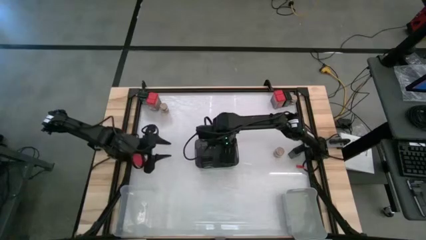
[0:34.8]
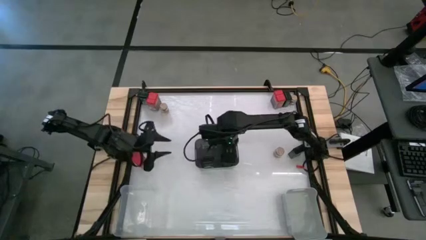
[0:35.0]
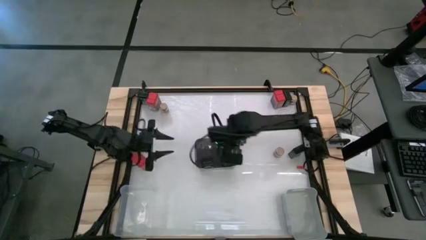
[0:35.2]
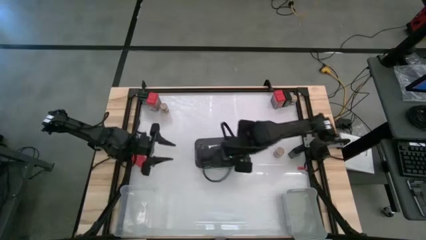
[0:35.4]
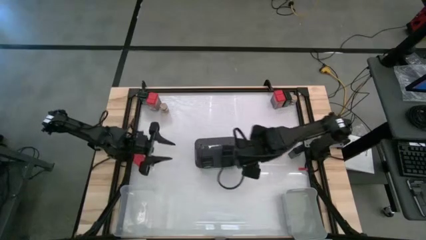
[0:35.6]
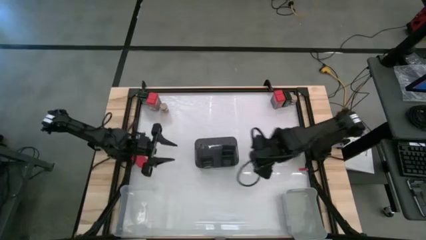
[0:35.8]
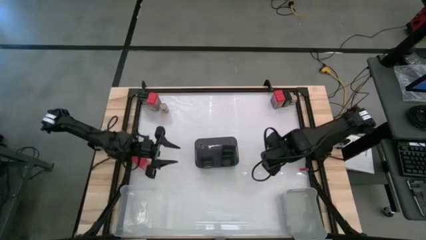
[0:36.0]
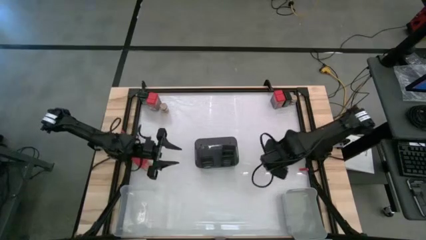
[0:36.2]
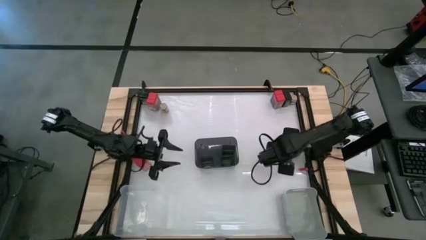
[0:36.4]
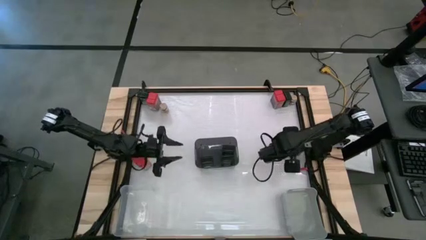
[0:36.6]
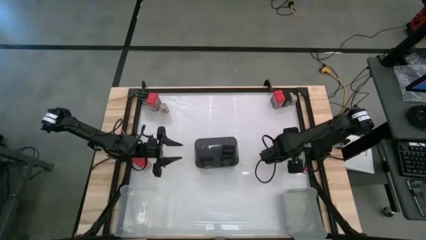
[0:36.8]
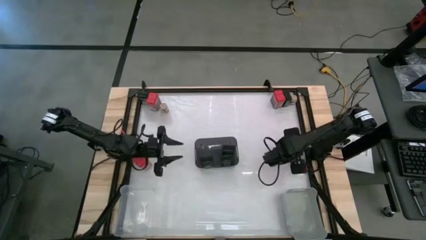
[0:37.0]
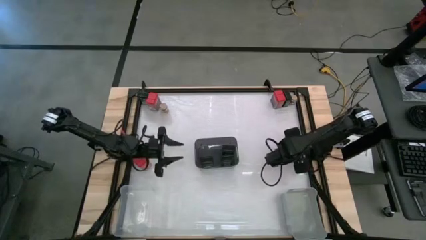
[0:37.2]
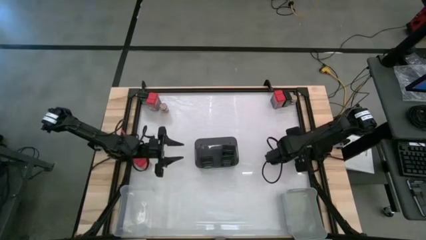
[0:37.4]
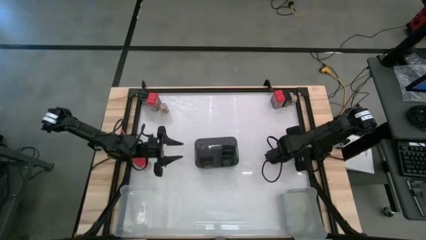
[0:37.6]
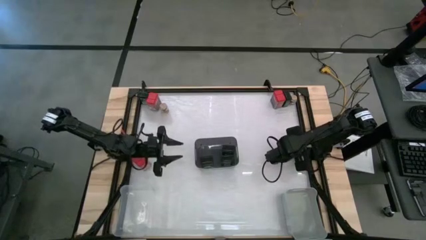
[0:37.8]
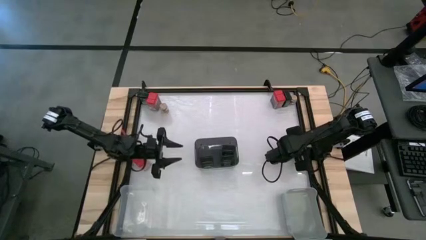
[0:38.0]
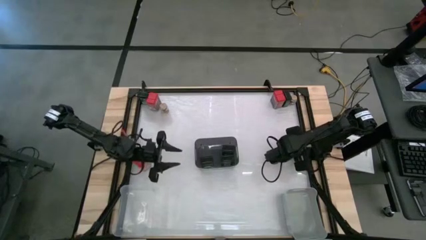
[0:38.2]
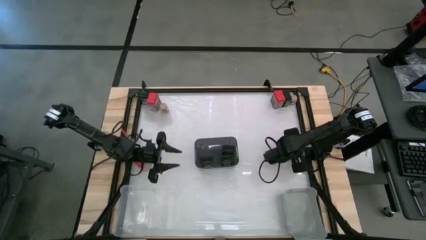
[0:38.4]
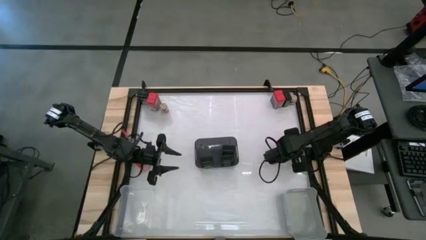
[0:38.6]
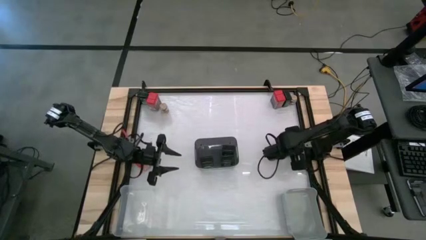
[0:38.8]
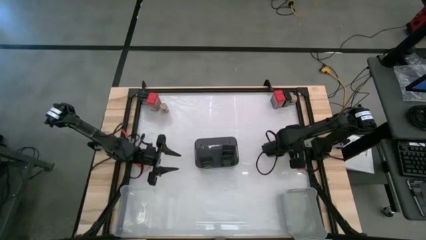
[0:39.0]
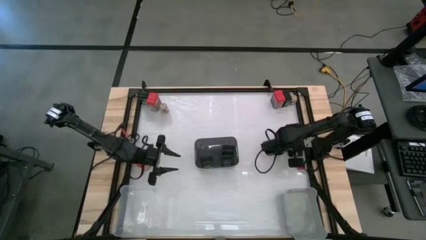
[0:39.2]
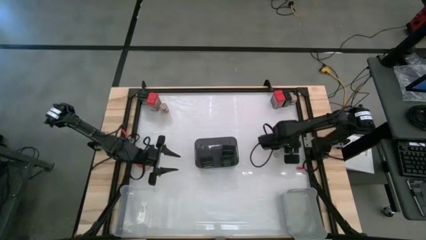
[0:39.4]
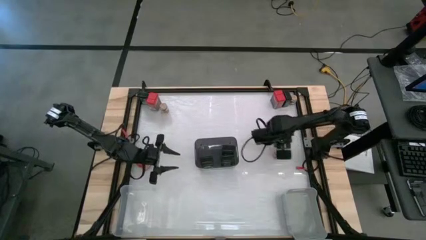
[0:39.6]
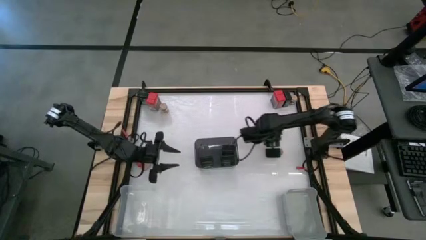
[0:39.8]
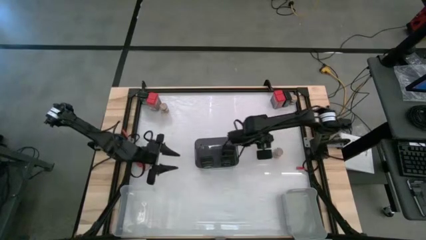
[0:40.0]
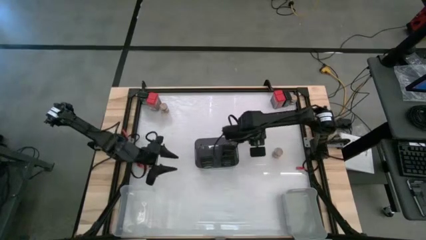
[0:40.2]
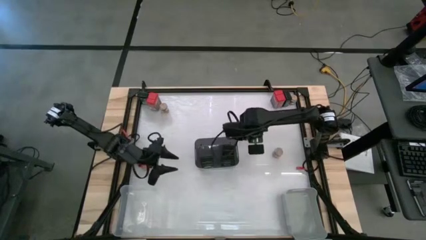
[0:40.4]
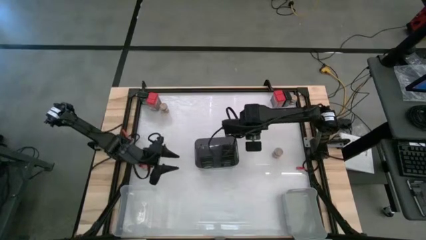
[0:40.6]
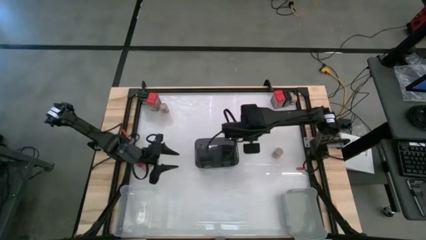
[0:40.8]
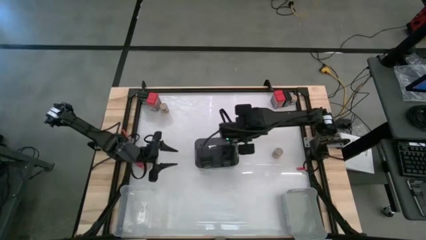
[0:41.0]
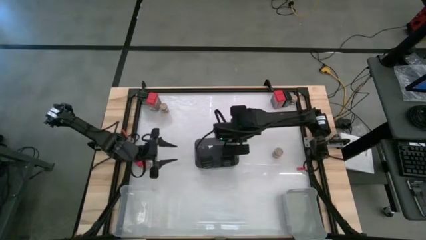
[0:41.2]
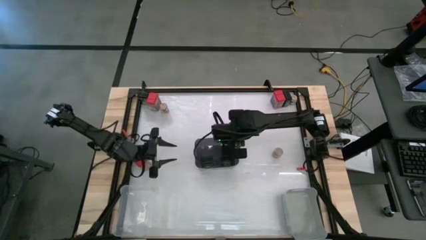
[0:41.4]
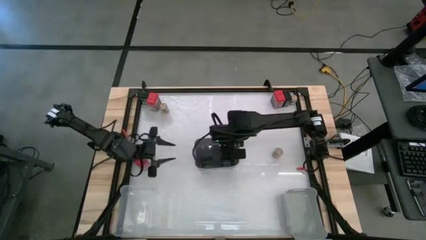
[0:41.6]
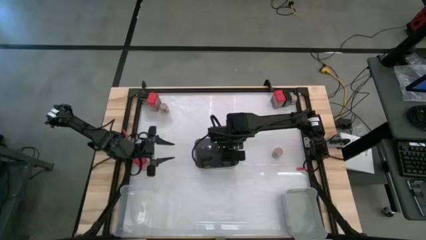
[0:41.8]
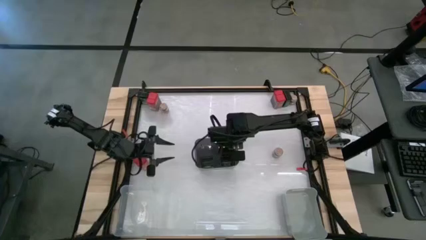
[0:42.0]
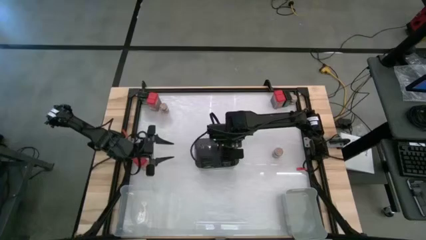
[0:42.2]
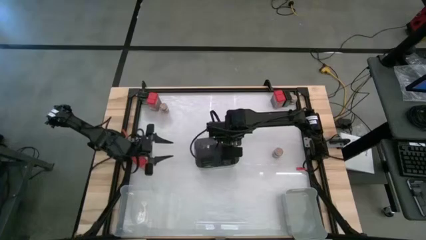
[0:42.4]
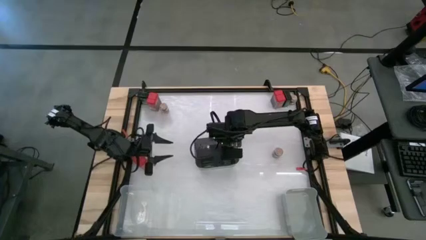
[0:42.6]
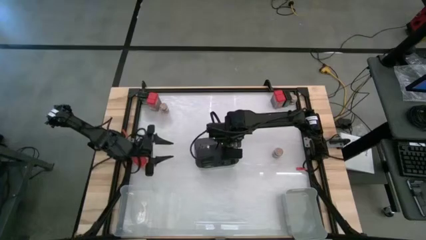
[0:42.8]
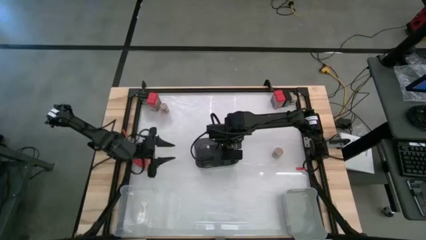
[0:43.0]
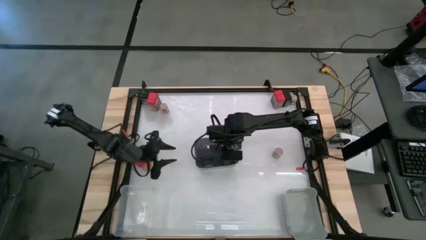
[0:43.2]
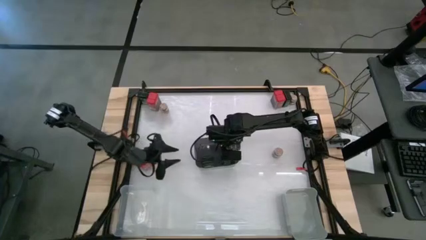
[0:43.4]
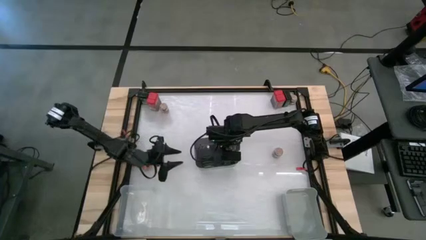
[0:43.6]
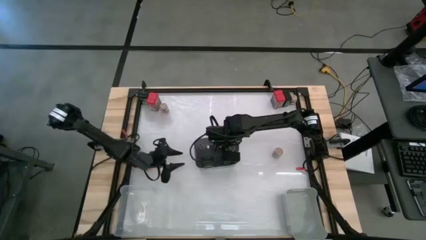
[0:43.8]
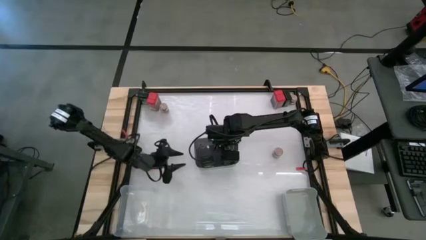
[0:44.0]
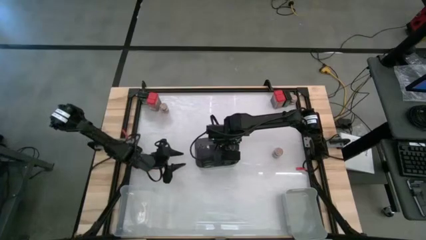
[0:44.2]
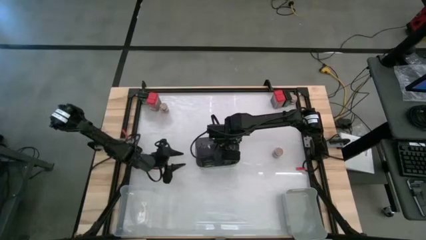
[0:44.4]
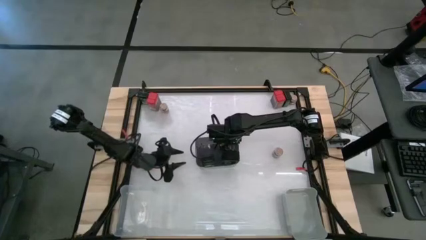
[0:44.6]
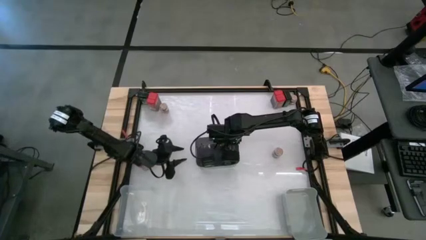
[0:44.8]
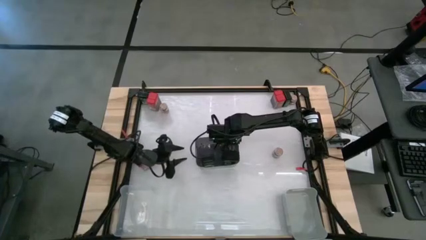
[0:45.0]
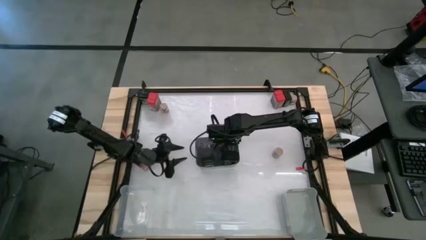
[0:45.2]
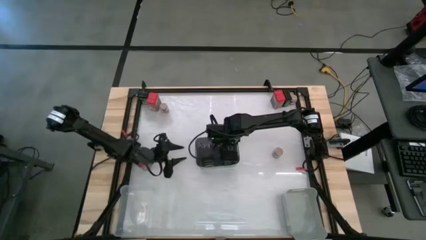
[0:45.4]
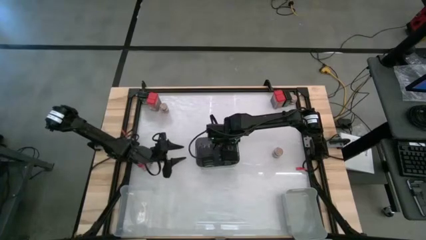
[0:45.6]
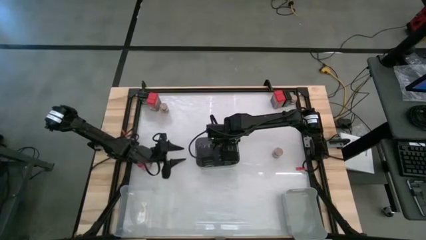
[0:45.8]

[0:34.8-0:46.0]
Task: Sort spices by type
Put the black seasoning can into the black bin

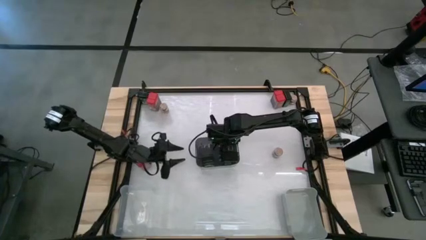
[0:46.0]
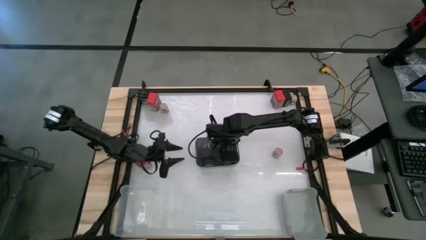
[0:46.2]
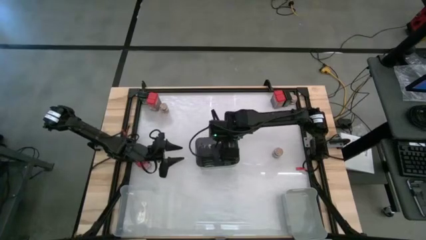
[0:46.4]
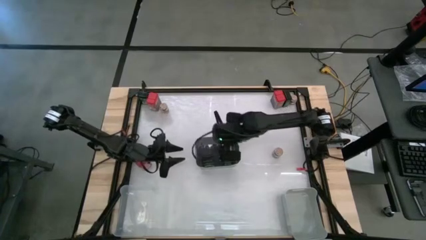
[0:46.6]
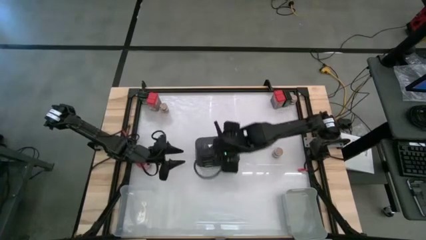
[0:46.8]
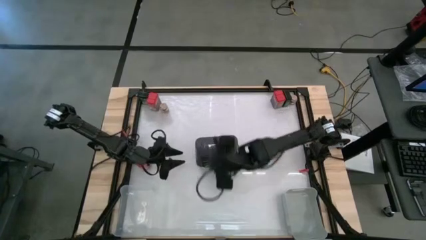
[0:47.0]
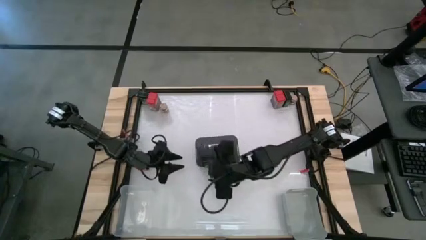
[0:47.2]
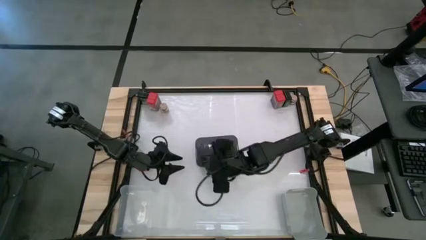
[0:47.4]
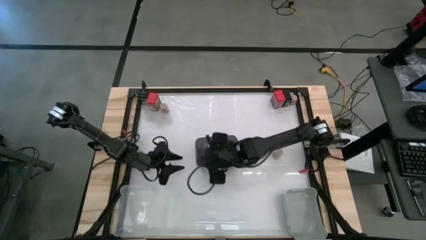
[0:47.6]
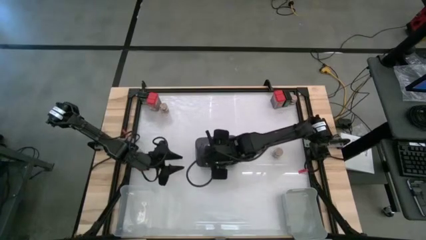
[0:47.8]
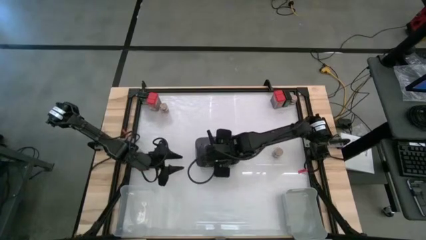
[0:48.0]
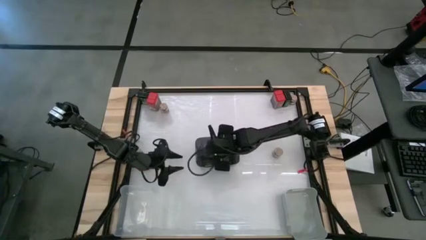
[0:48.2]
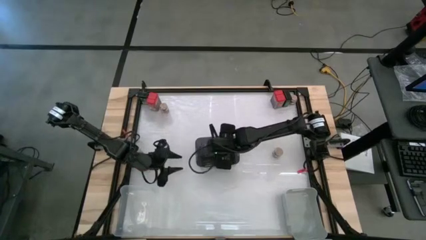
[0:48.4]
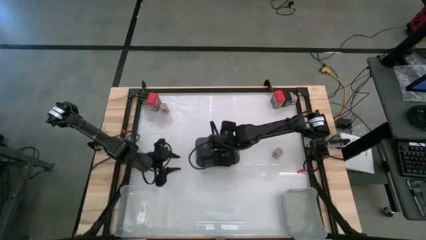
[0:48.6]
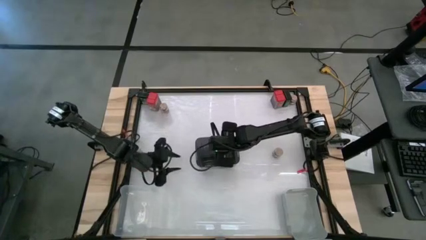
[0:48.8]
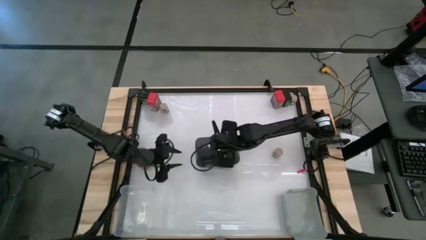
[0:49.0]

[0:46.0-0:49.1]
Adjust the black seasoning can in the black bin

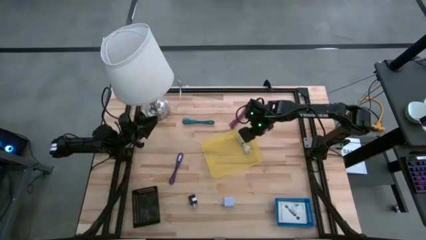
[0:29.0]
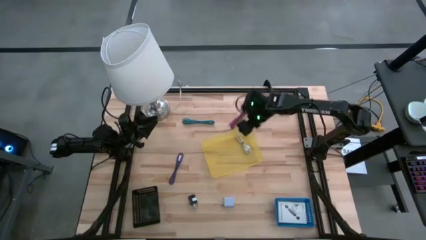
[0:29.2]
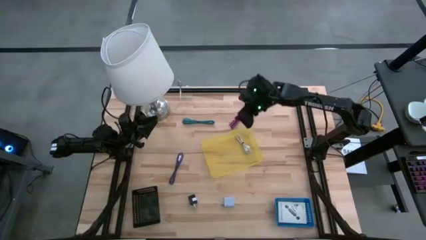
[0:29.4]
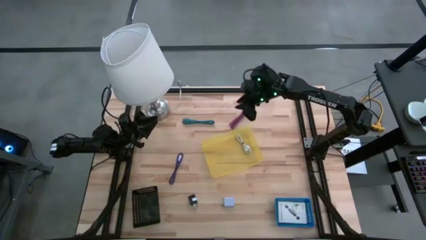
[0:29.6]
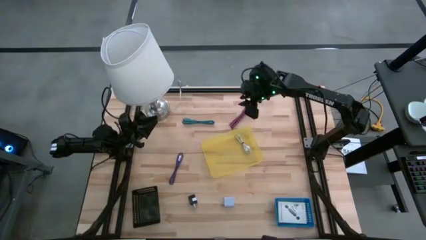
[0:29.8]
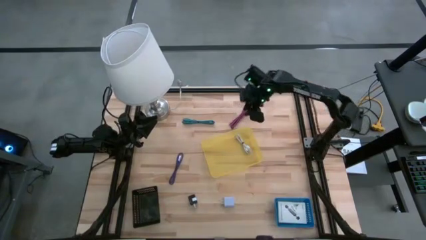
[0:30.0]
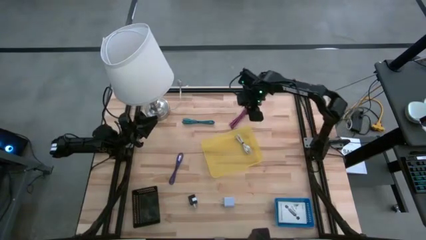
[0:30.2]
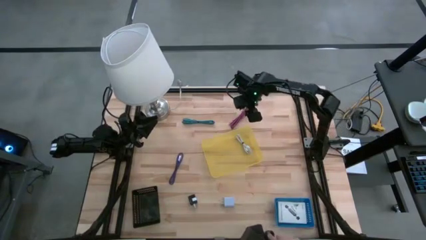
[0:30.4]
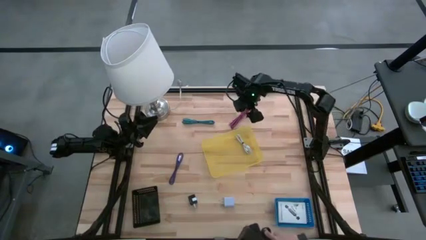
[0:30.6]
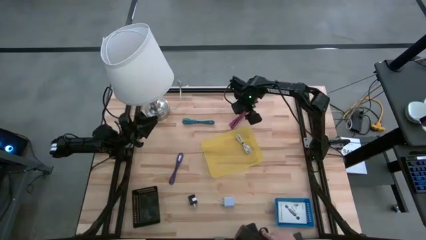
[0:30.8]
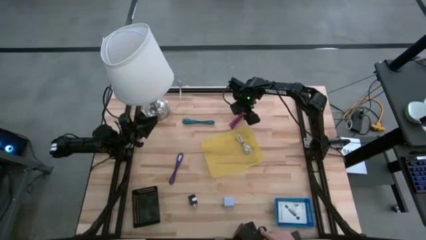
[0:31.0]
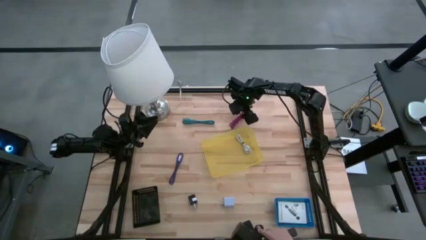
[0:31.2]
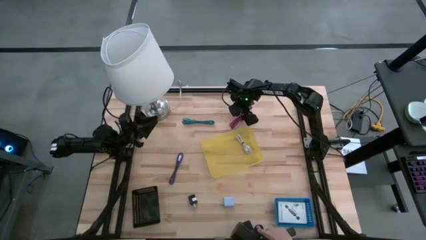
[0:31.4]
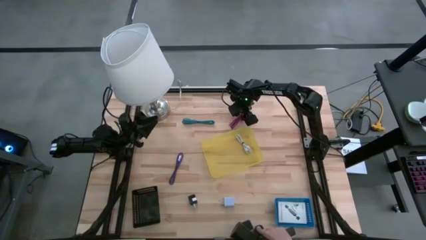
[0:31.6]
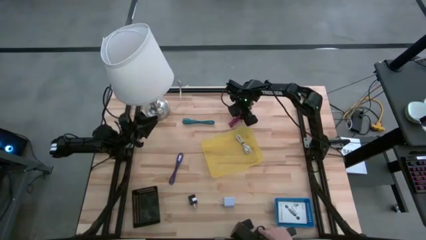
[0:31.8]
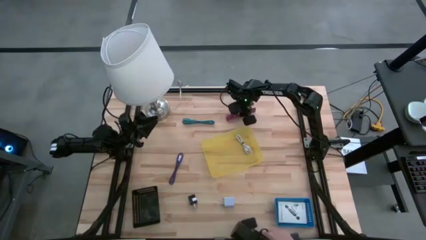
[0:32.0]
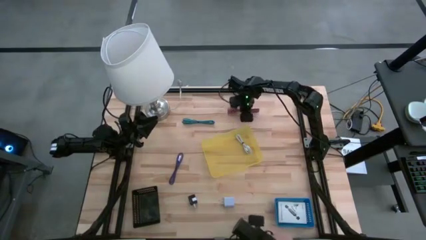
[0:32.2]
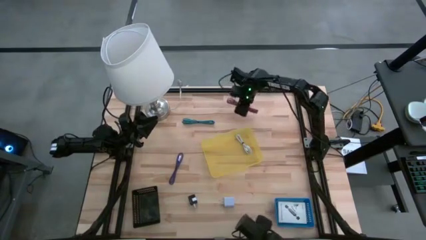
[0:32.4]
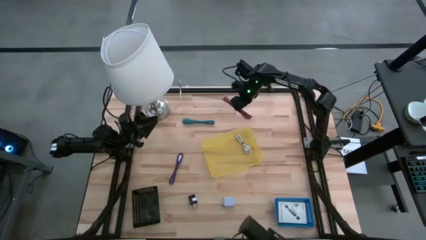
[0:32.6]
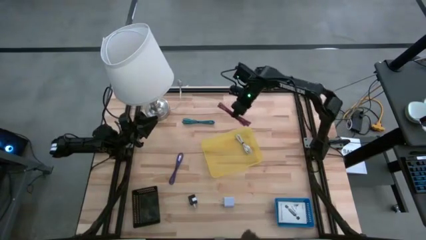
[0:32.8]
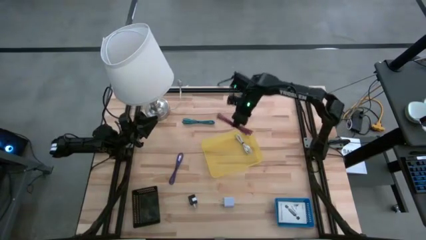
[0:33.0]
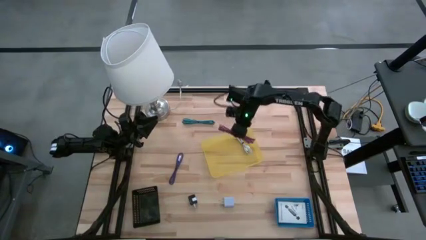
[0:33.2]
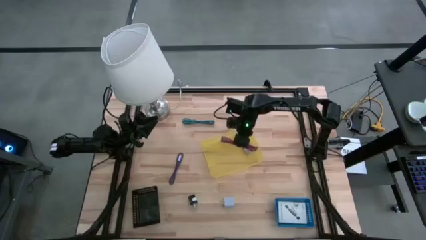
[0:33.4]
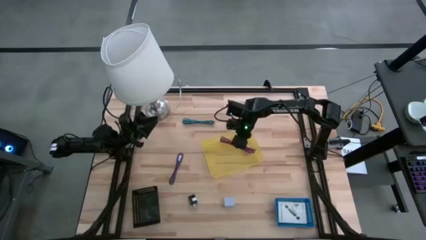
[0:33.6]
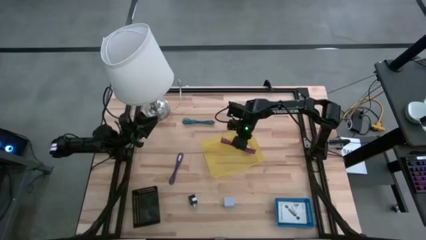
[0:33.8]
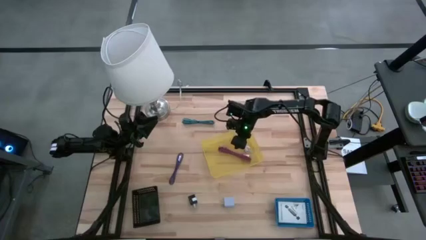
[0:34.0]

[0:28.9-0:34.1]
Task: Pick and place items into bin
Put the pink charger cable wire into the yellow bin
